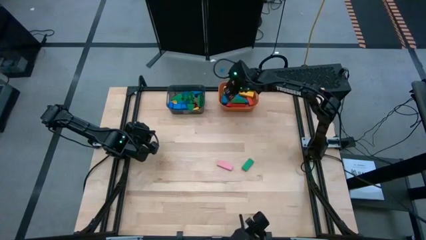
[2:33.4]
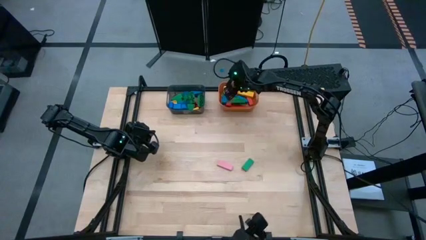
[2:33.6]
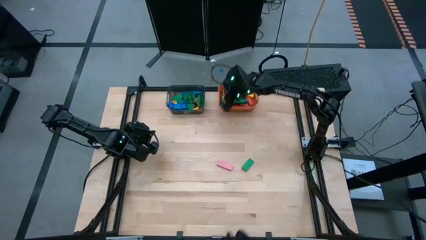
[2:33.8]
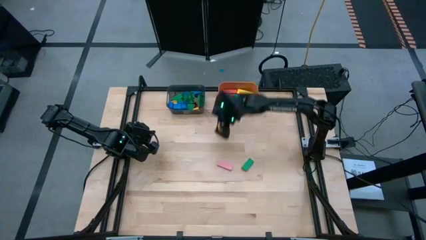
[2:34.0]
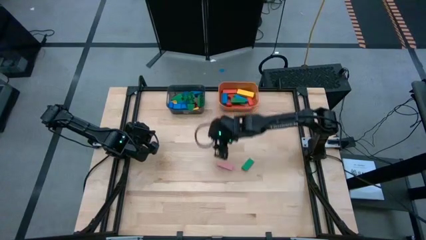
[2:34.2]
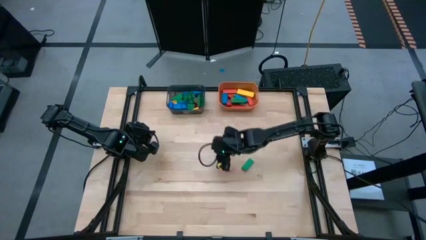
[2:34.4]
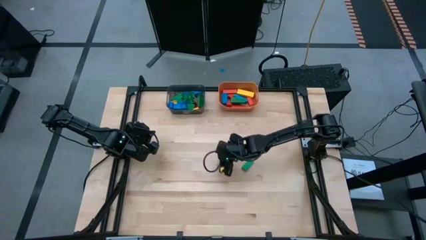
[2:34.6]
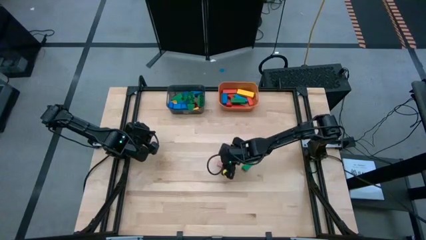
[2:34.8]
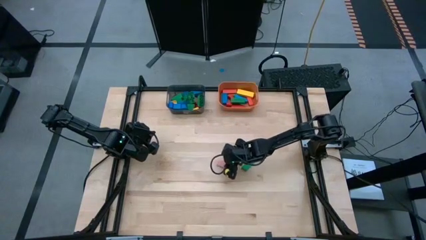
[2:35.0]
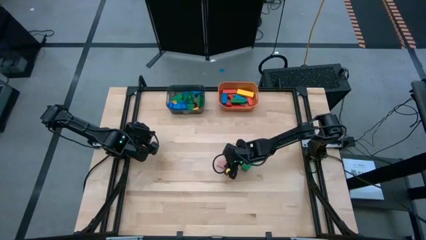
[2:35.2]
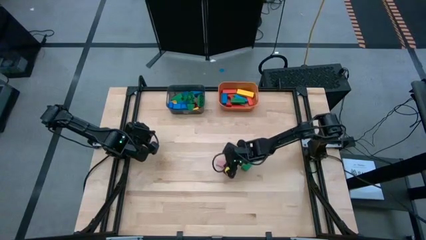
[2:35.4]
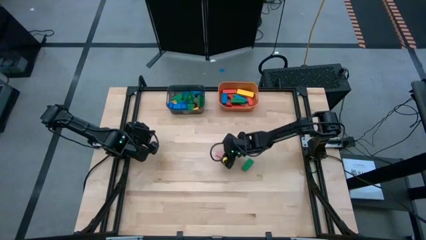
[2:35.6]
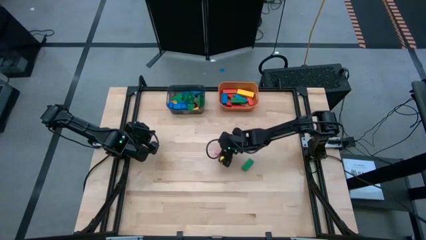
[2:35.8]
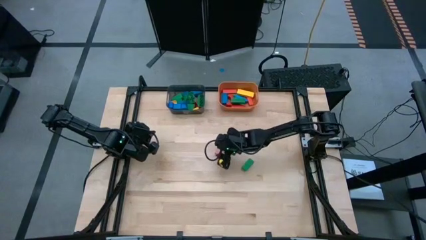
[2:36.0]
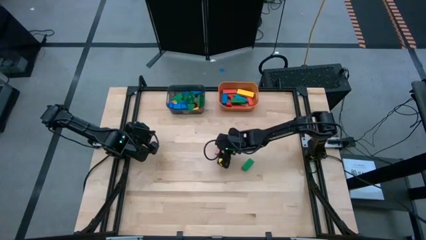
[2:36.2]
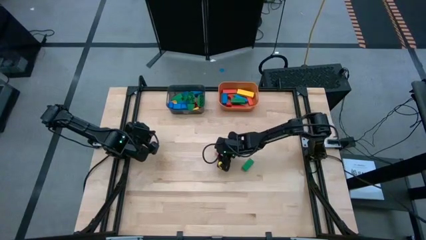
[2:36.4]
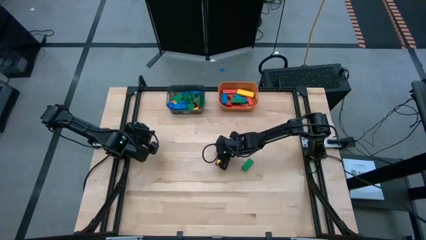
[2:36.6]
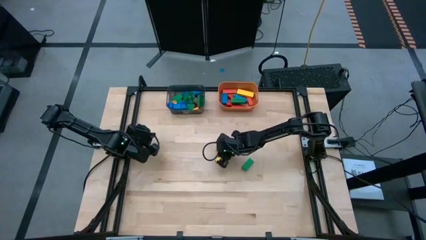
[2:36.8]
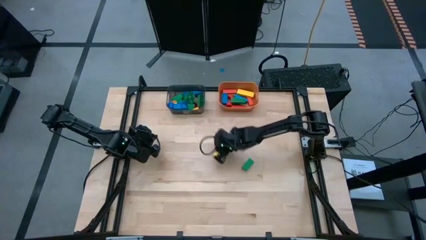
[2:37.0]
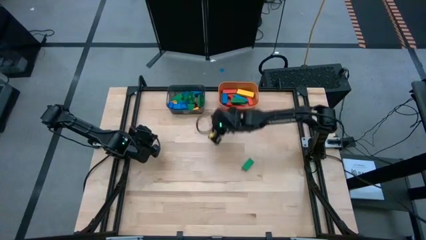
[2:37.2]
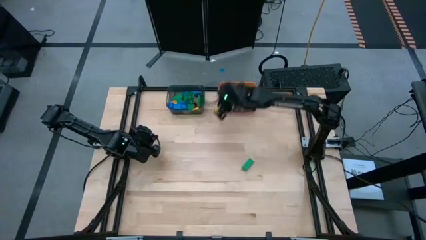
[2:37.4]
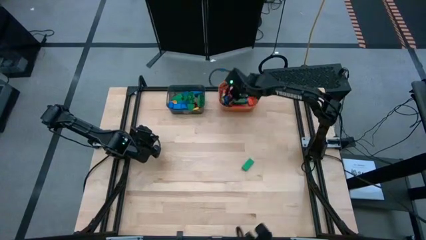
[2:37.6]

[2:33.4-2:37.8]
Task: Sort blocks by size
Put the large pink block into the orange bin

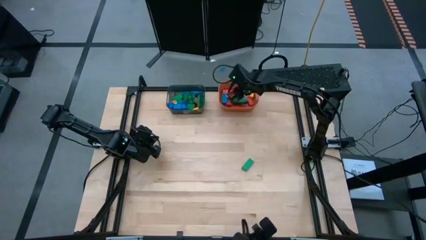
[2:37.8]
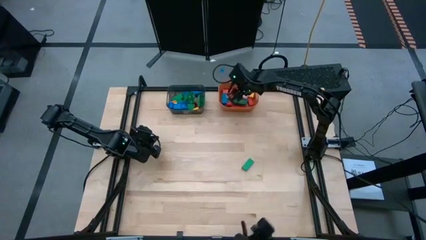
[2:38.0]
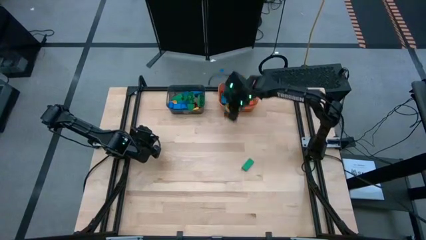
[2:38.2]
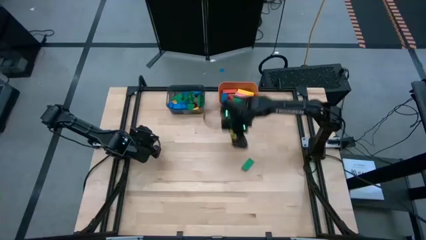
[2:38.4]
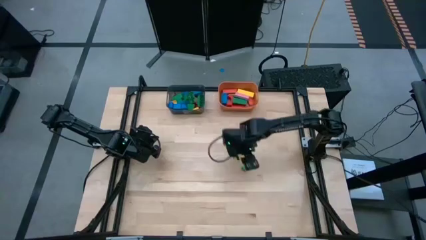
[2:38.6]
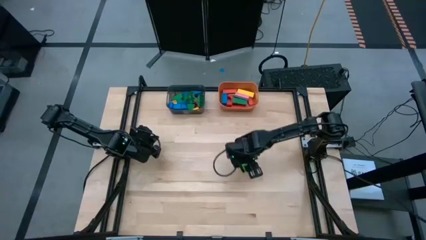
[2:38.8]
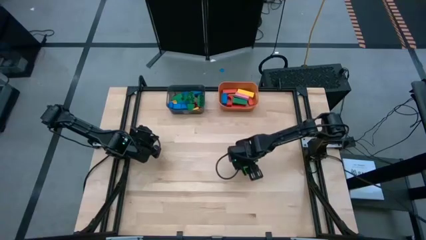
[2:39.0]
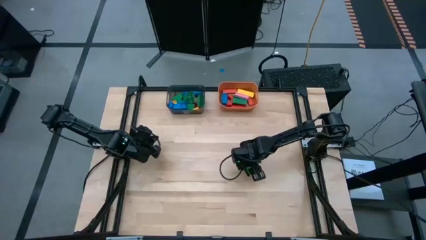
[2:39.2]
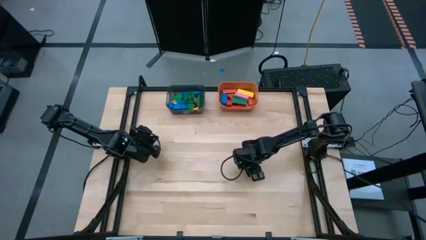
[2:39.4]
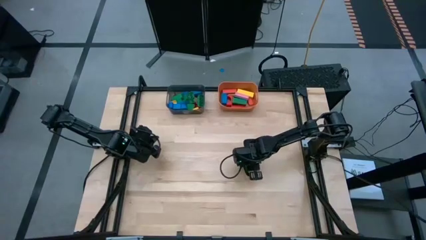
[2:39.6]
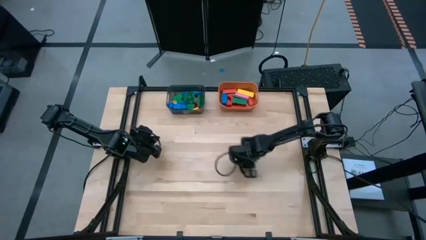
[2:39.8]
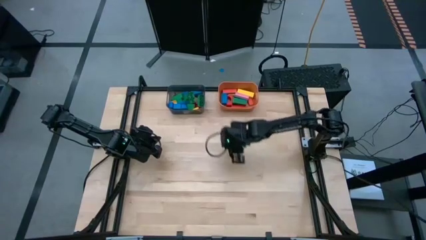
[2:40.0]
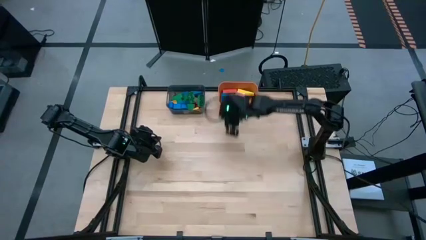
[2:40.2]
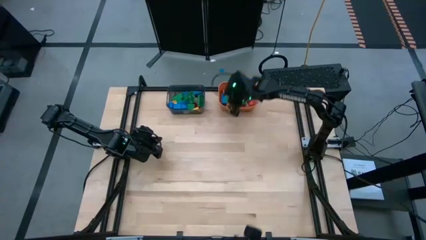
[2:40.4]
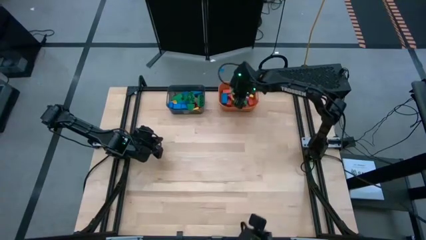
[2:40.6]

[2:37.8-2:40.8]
Put the large green block into the orange bin

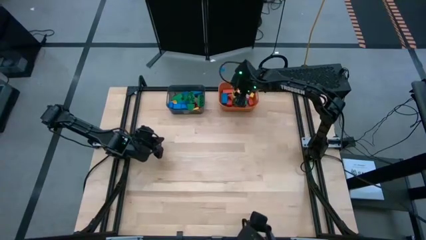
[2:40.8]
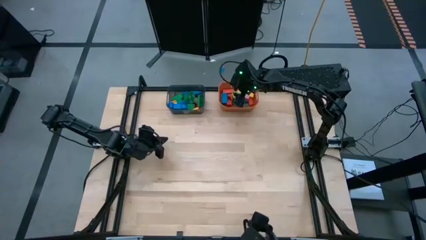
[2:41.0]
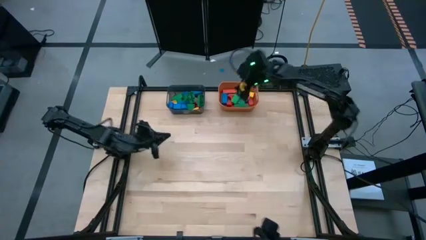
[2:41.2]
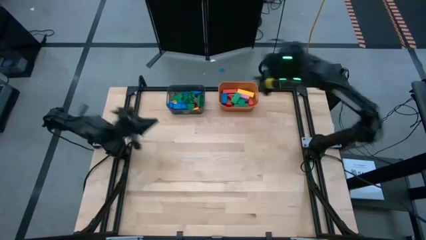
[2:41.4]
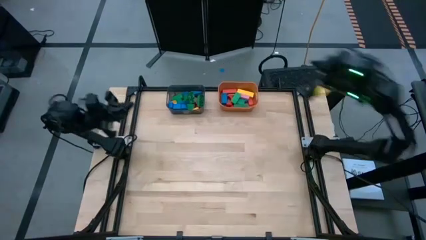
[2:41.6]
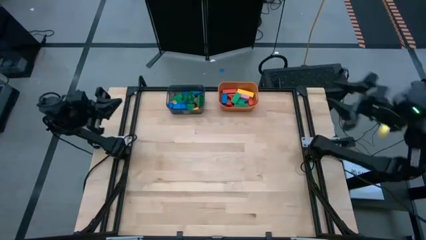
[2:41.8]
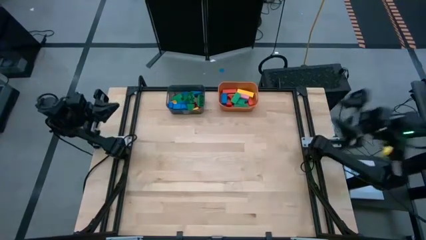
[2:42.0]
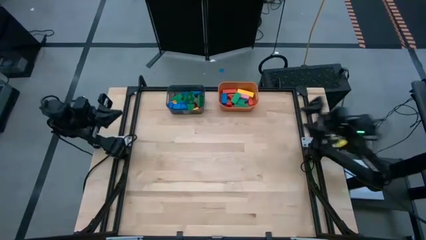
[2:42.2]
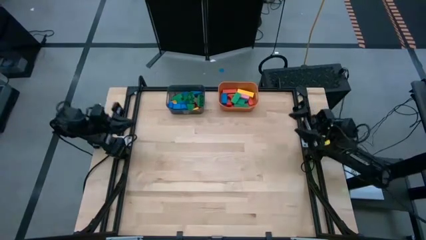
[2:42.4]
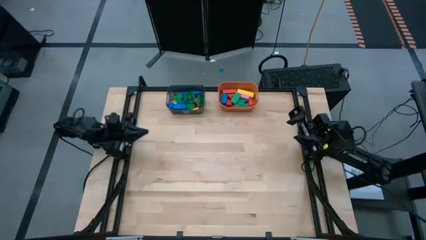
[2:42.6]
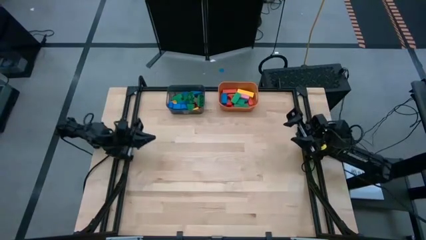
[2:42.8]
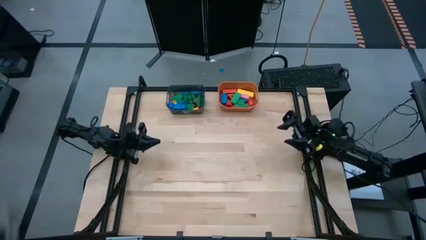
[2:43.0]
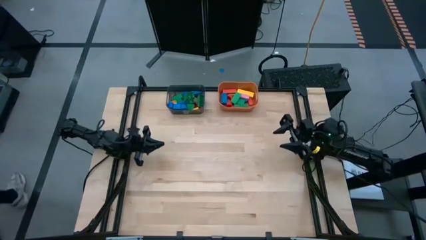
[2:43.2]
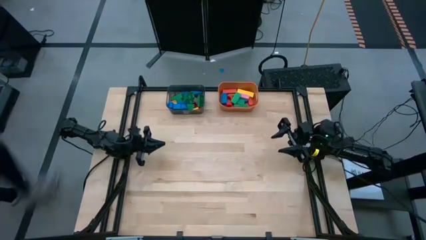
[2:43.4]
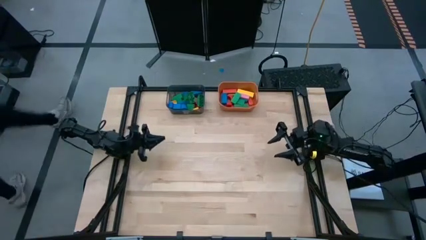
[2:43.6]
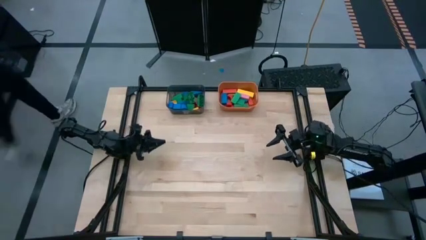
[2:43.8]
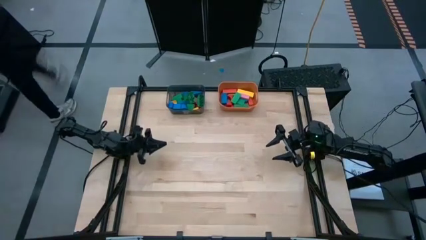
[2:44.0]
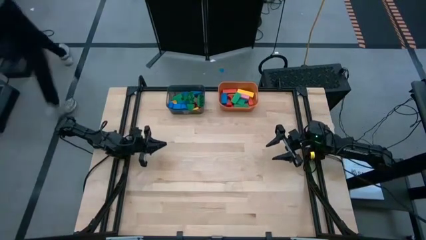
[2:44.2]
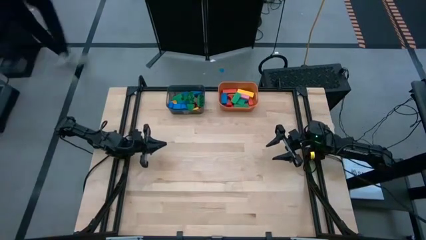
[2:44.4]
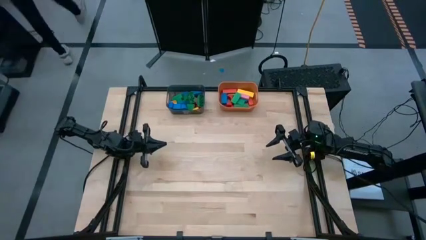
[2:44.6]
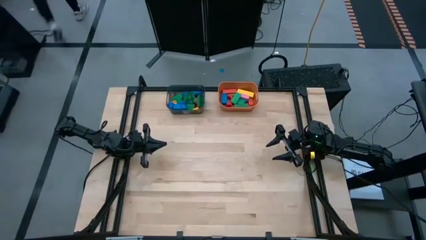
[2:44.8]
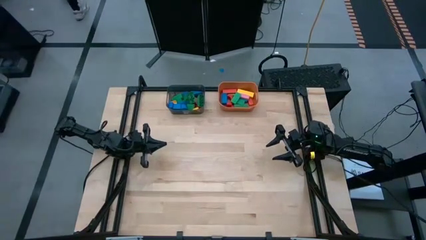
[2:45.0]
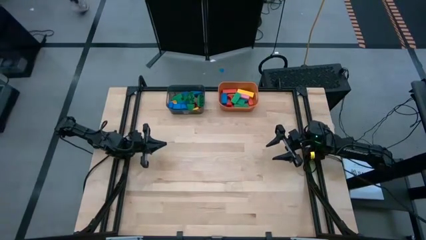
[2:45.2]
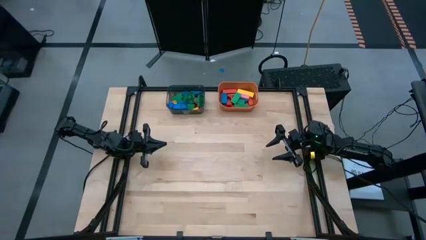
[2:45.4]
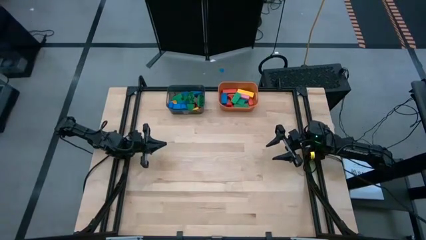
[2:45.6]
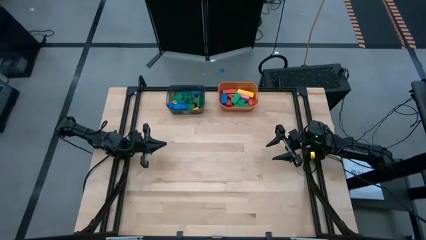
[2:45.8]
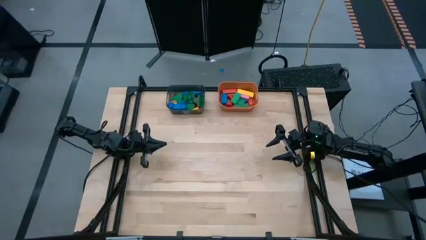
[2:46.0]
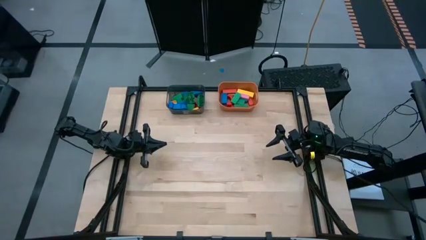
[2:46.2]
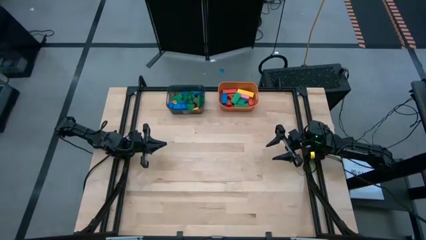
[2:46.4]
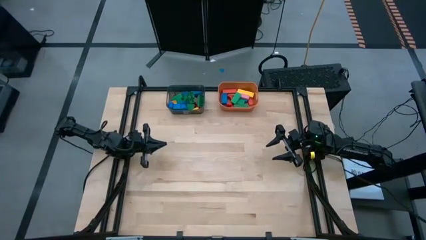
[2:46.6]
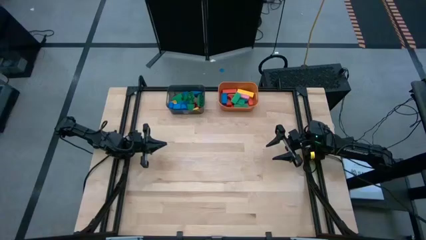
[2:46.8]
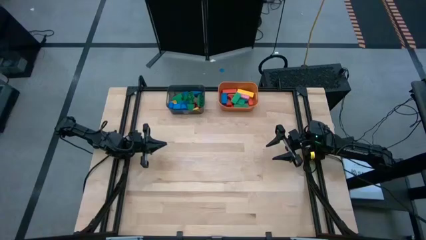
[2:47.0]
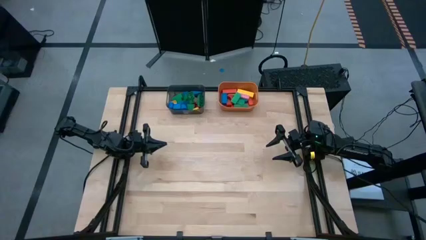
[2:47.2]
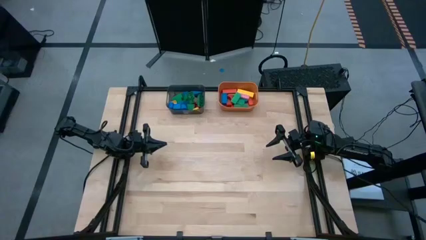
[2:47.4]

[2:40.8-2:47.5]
Return to Home Position

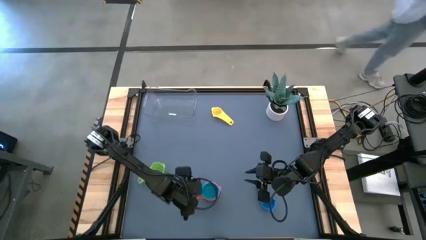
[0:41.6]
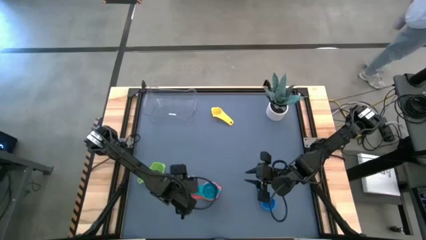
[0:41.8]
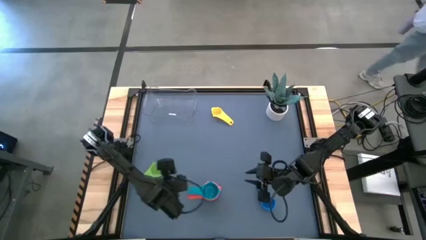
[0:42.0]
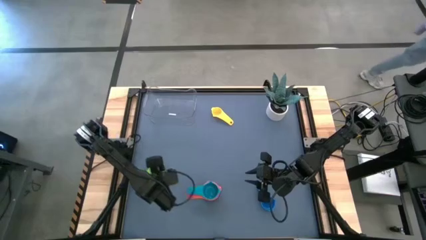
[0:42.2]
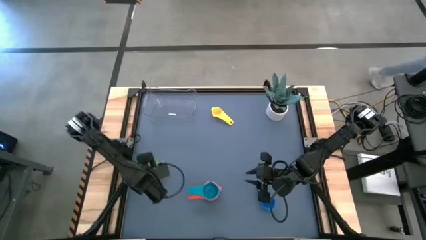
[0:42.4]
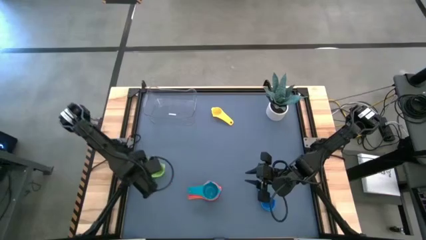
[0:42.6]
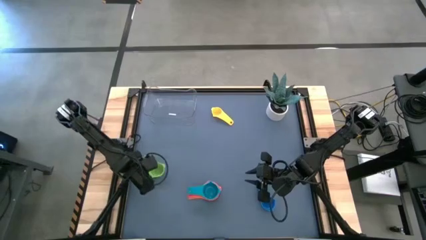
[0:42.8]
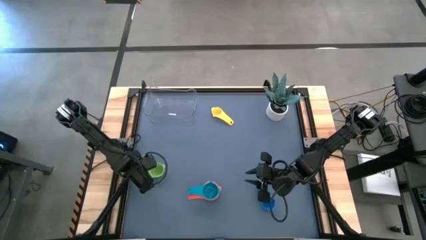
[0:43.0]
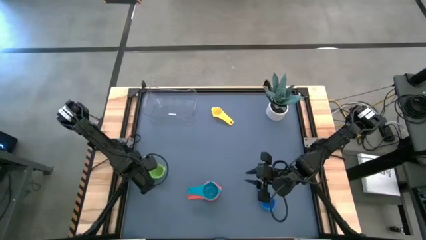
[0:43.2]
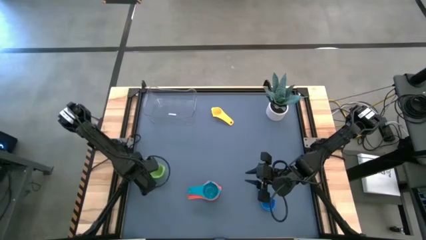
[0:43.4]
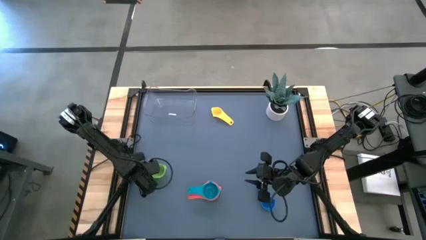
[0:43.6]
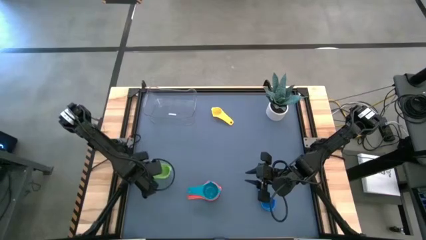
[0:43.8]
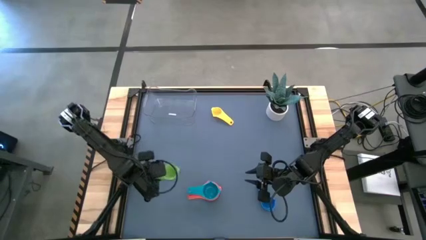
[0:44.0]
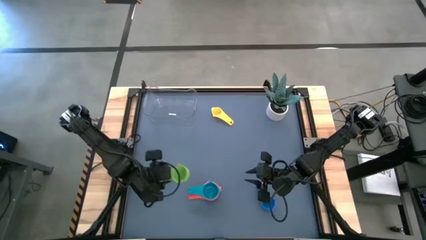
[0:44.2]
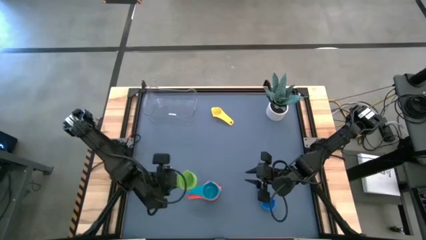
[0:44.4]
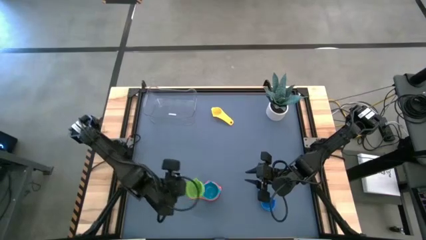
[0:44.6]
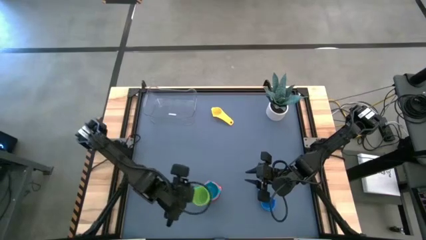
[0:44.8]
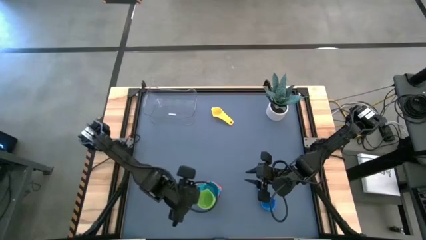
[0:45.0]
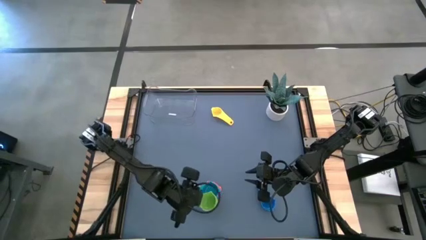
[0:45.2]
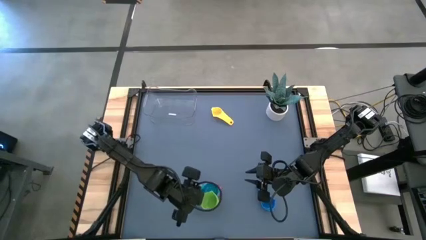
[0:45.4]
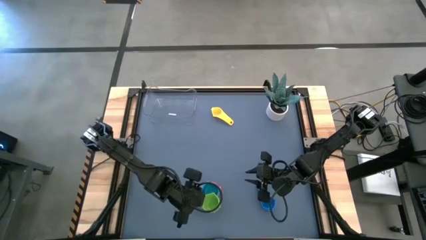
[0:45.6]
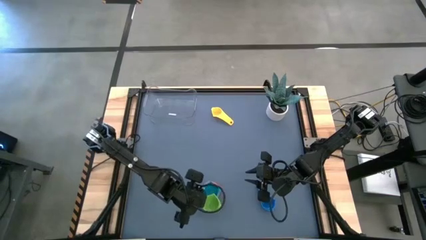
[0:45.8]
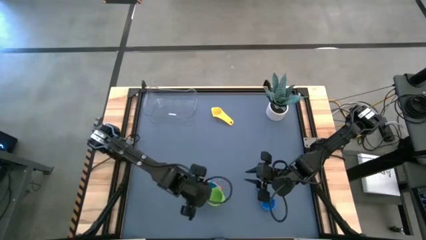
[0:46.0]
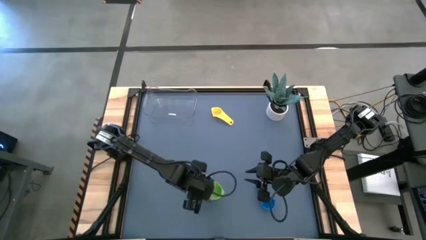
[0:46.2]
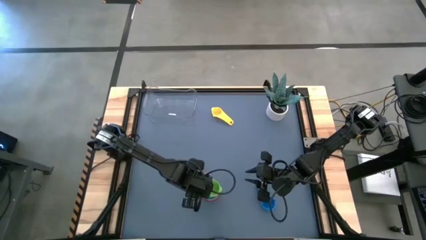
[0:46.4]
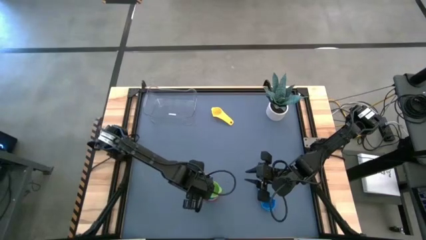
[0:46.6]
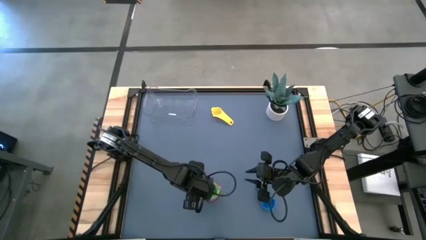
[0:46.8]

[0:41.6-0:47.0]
Task: Nest measuring cups in basket
Stack the green measuring cup on top of the light blue measuring cup
